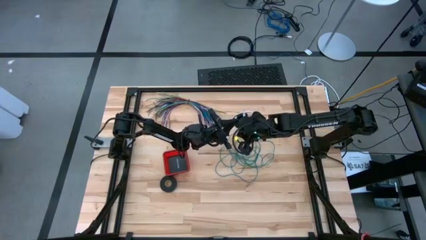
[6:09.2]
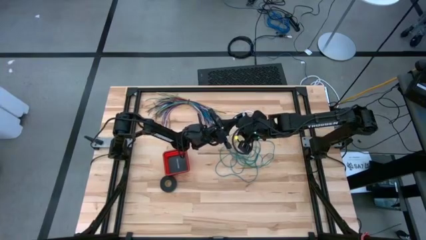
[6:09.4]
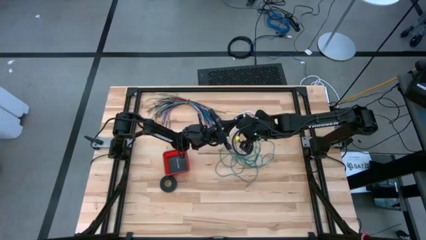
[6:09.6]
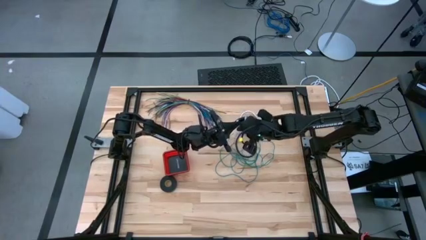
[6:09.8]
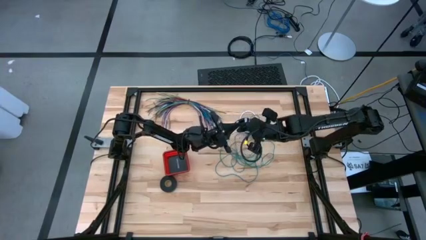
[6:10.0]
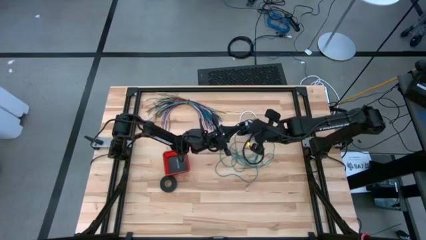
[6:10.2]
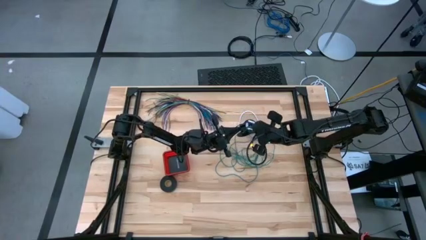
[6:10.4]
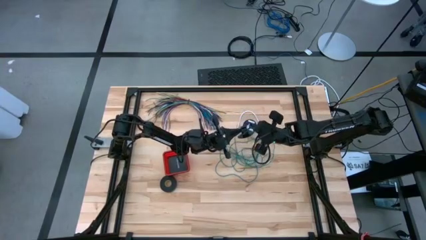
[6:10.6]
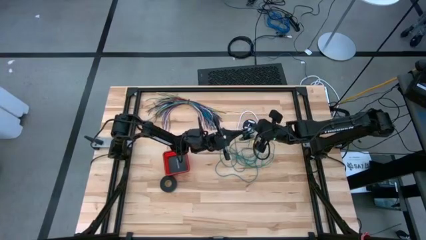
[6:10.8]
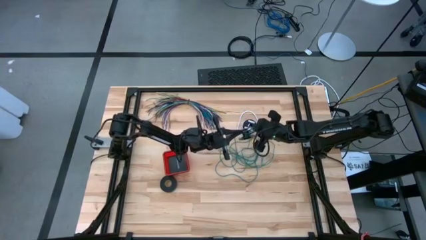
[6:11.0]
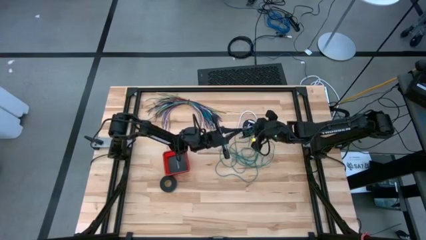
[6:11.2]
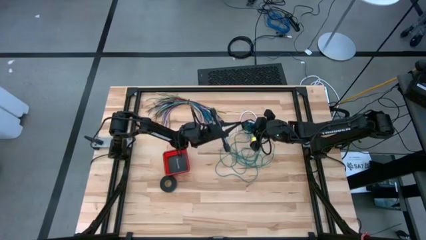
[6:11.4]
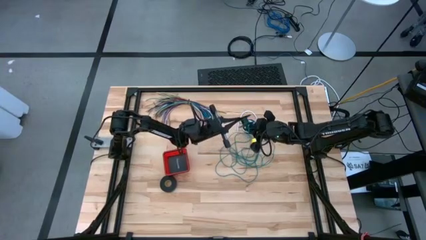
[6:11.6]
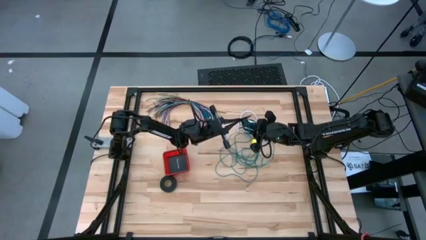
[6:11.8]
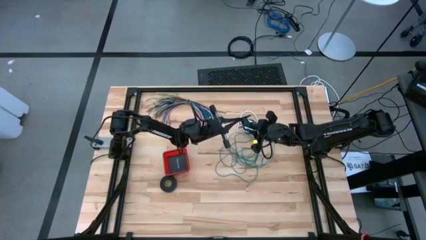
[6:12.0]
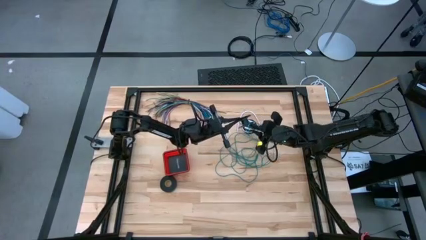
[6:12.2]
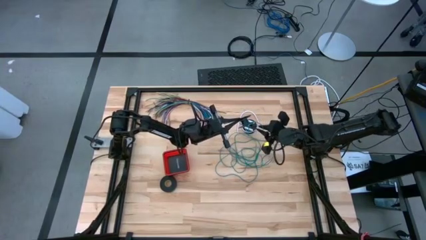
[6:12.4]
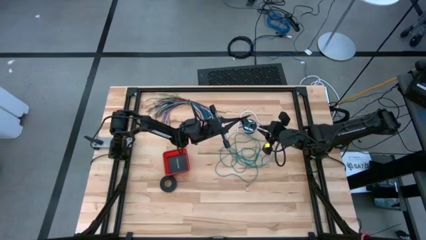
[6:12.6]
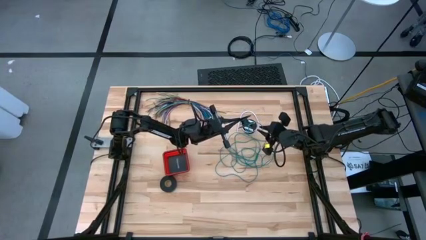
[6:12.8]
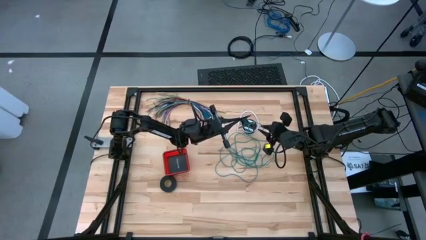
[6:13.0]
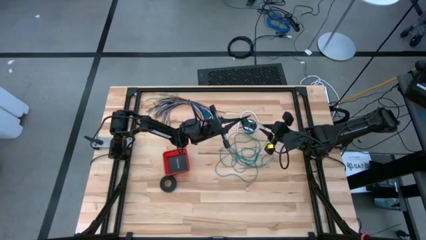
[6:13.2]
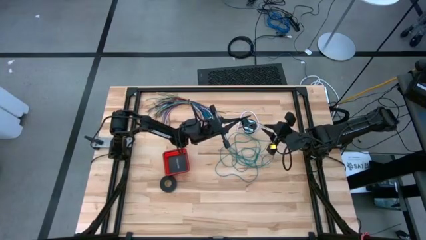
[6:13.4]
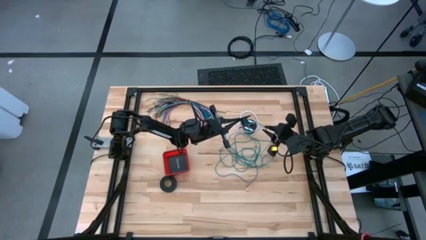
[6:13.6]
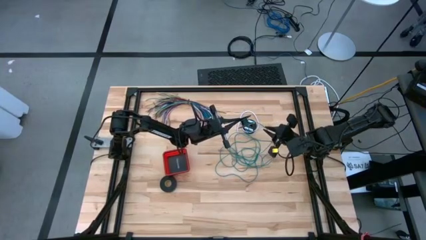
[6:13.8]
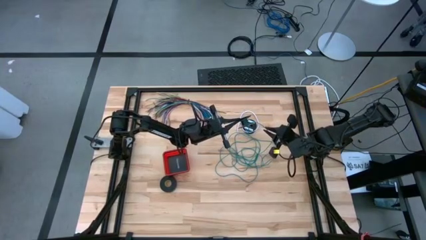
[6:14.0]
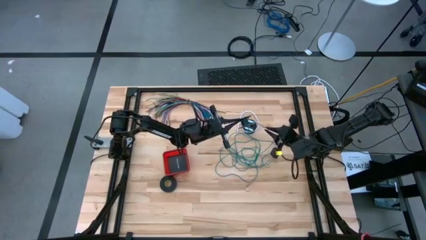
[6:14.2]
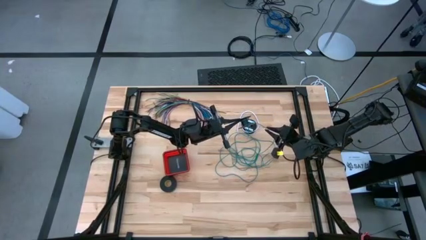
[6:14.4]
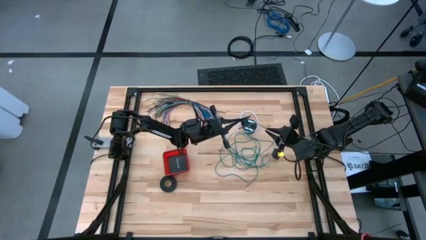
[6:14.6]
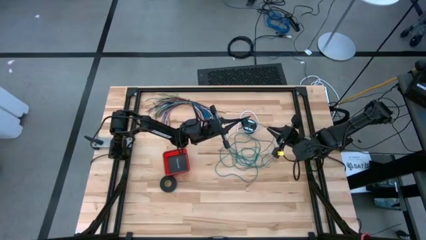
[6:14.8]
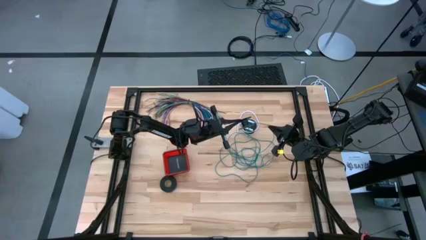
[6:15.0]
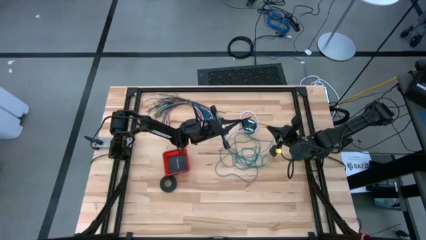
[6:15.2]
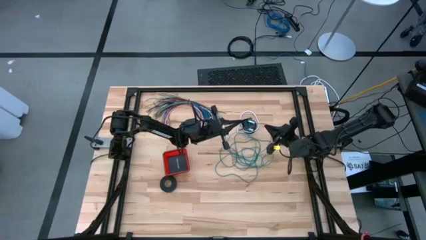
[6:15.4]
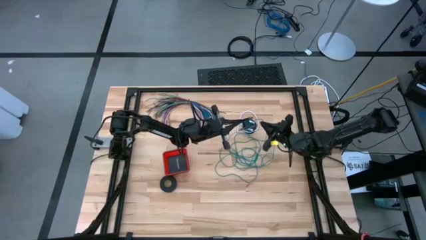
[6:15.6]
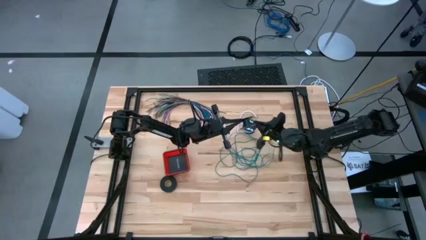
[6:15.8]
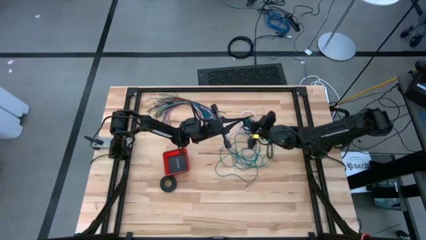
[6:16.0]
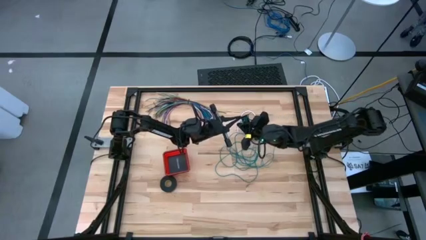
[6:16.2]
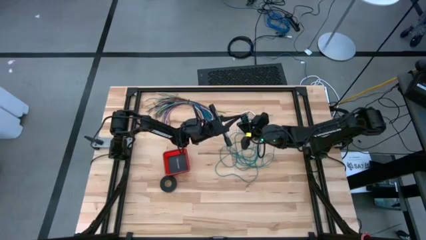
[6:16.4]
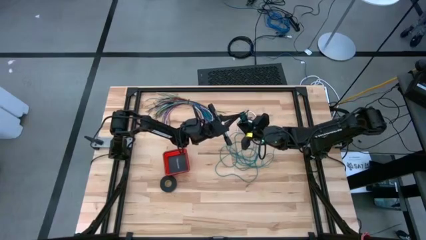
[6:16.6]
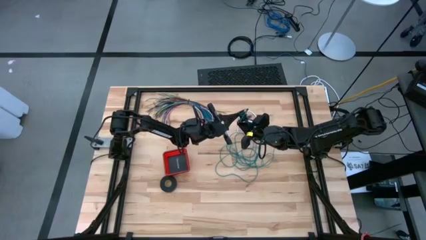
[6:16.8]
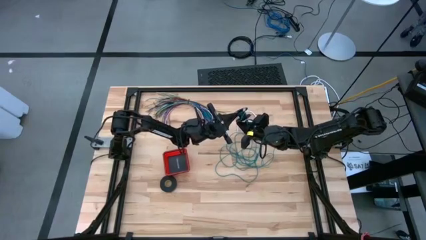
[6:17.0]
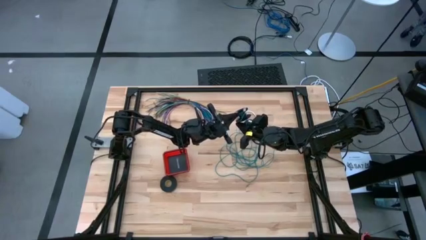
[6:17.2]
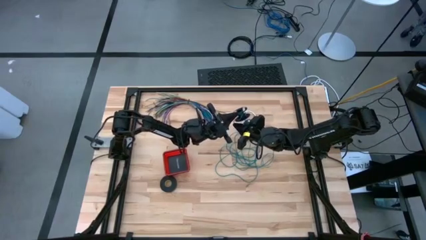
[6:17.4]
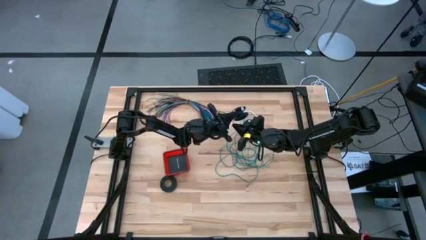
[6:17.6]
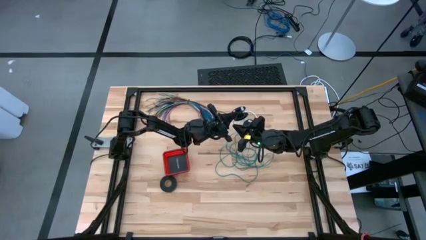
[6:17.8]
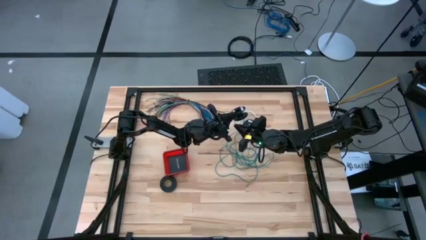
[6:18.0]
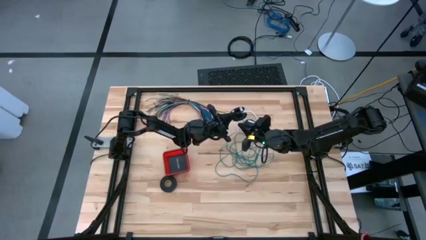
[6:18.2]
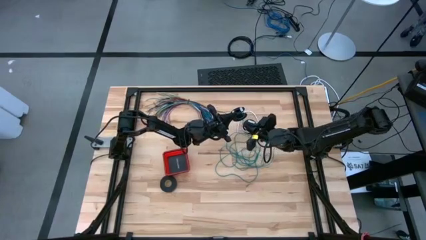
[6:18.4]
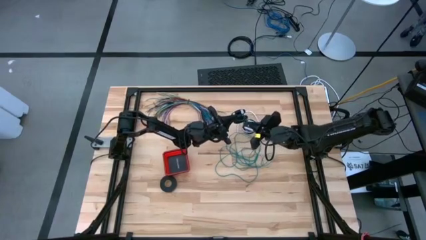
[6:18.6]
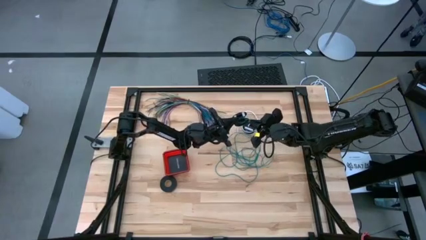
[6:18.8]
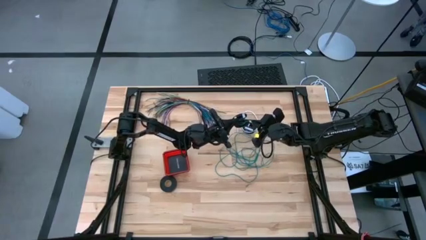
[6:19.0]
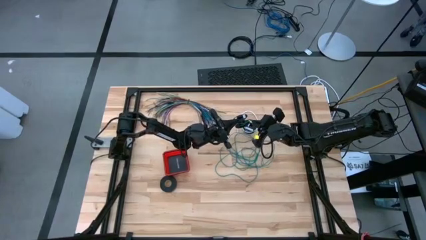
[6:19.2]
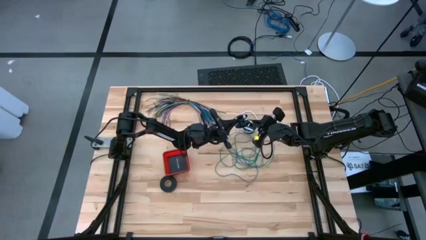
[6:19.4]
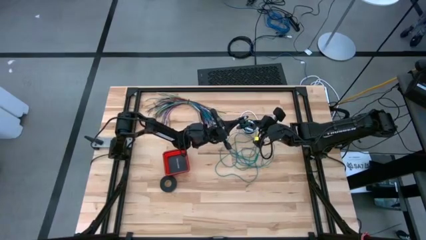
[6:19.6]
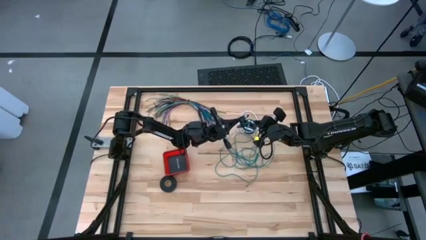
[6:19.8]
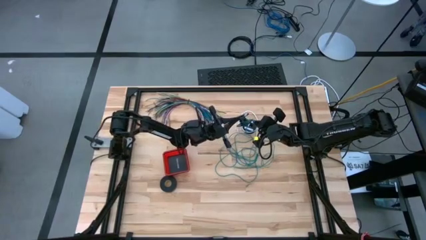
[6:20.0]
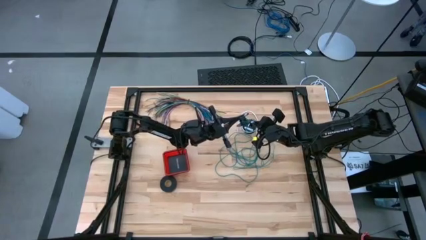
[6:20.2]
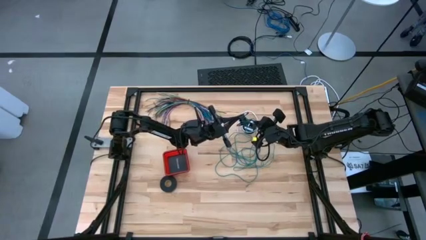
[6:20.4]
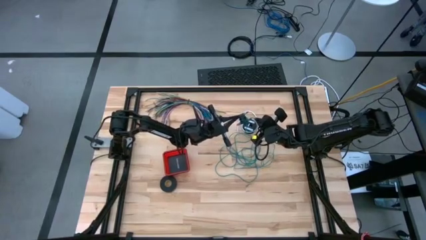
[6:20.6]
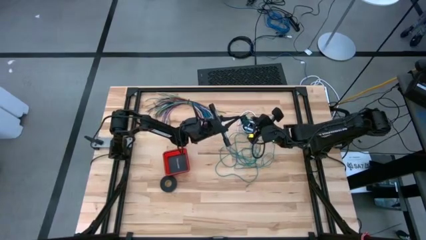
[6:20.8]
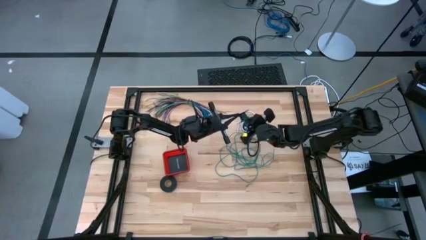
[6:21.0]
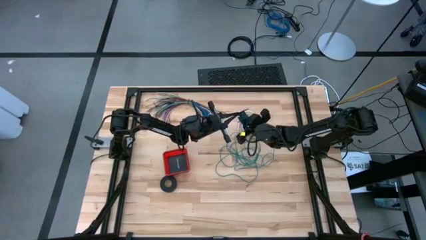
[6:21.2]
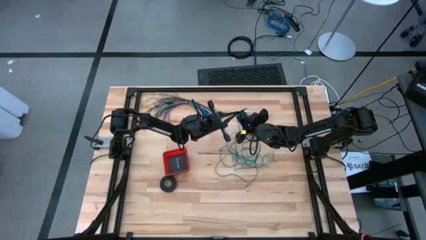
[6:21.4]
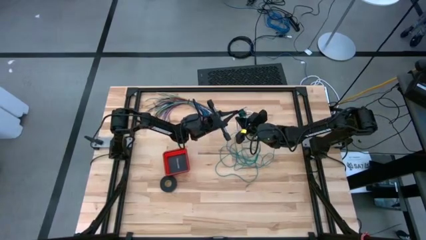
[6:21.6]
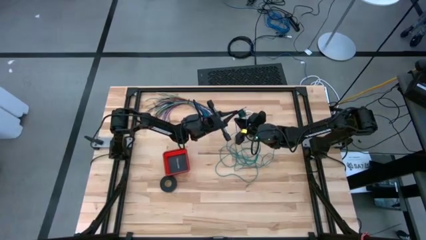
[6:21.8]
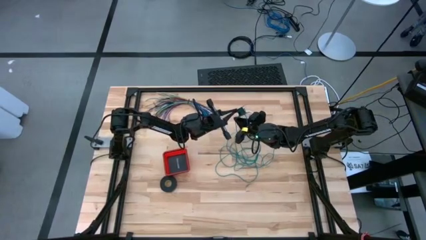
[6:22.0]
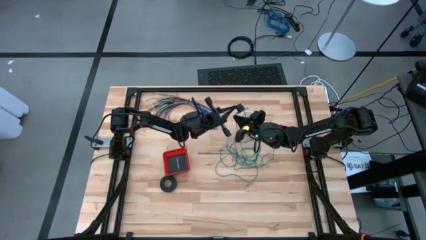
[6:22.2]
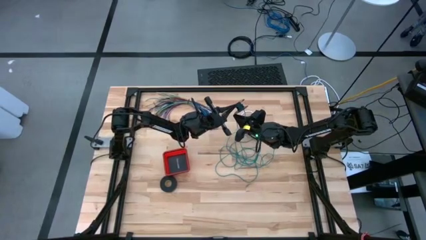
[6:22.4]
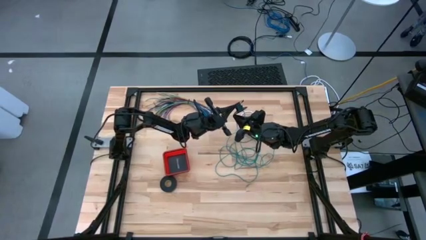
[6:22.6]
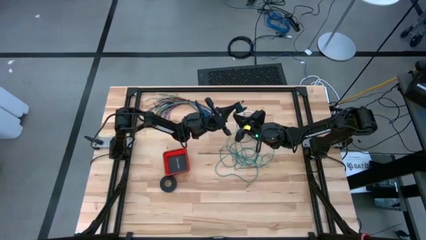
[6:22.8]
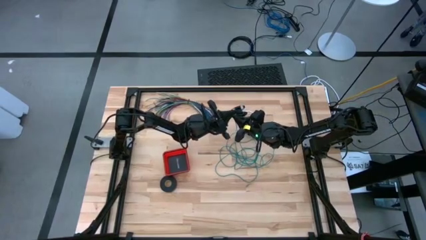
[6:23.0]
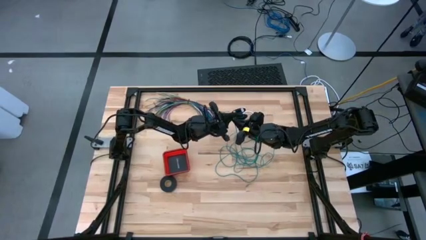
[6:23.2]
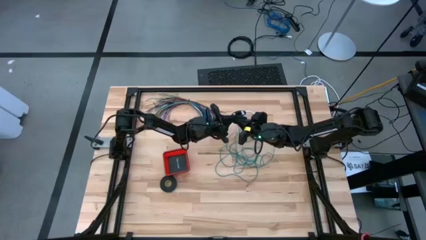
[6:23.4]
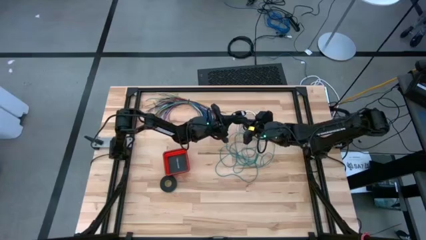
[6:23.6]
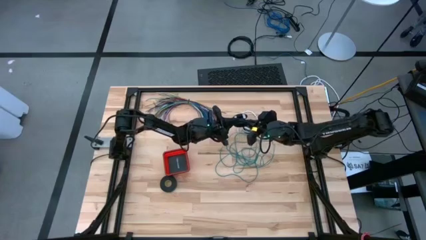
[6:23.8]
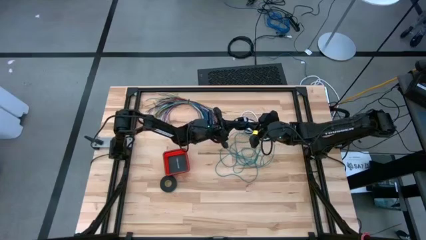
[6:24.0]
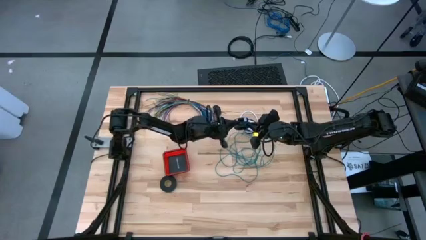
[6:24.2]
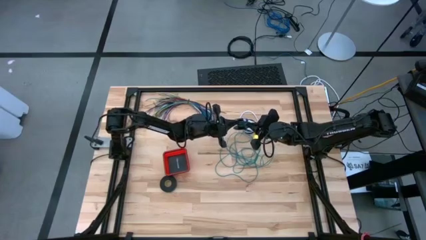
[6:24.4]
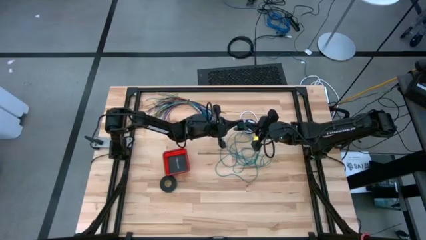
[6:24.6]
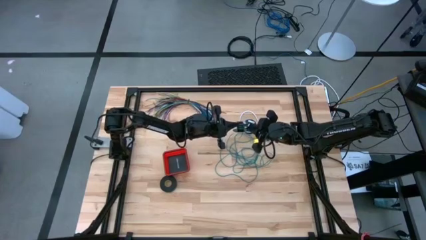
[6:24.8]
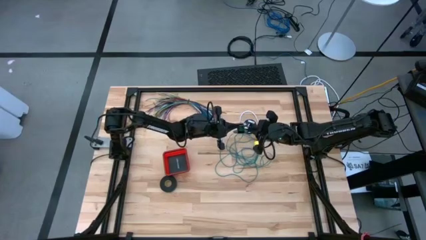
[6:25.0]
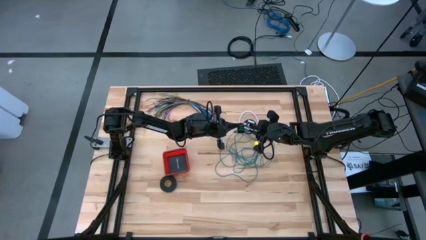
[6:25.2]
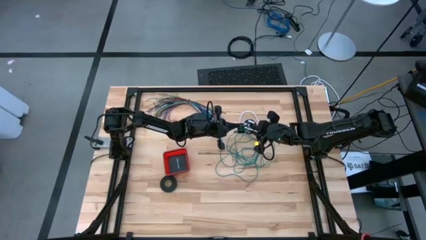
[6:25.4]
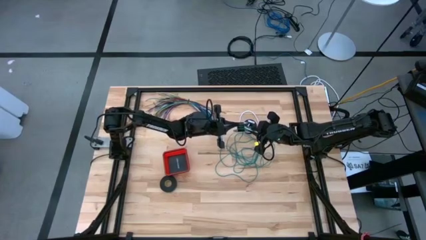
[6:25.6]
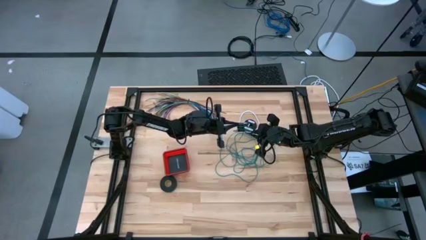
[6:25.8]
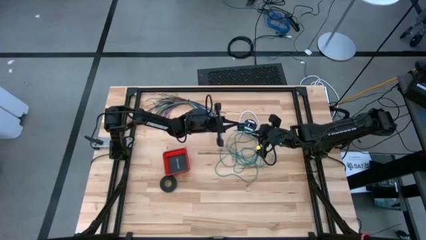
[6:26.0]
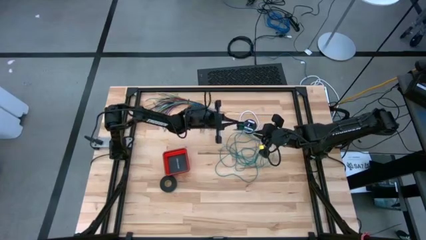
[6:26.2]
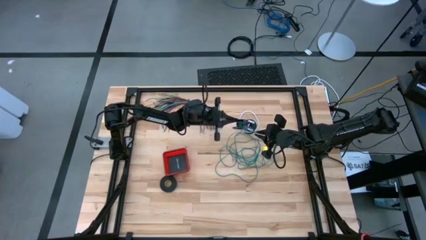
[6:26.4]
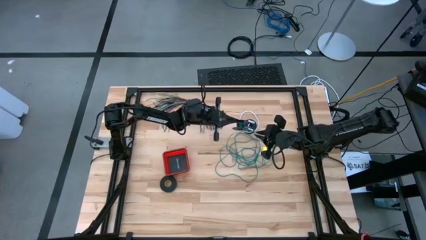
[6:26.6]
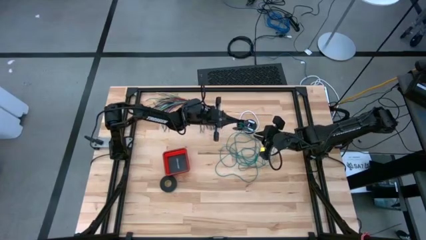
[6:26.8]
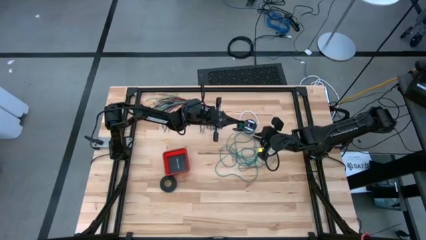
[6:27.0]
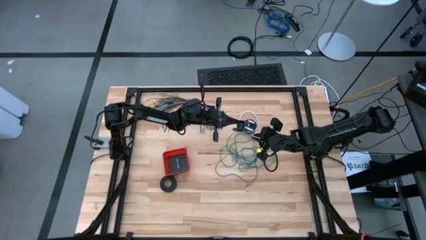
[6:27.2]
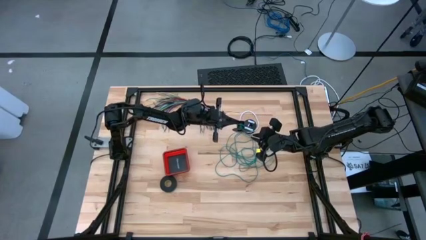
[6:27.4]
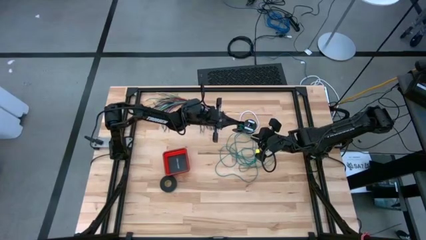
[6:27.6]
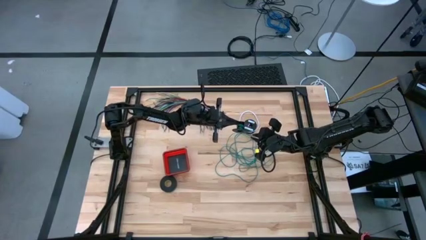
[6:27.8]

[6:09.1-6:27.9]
Task: Coil cords
Coil the green wire onto the spool
